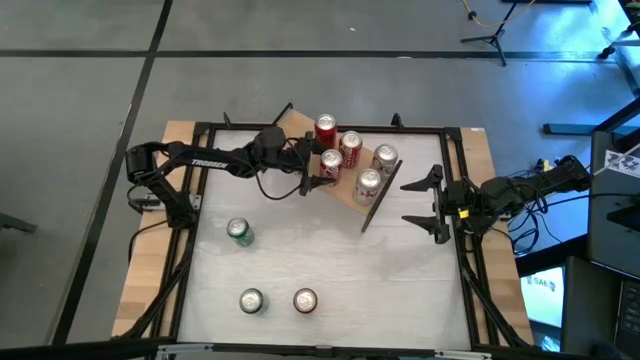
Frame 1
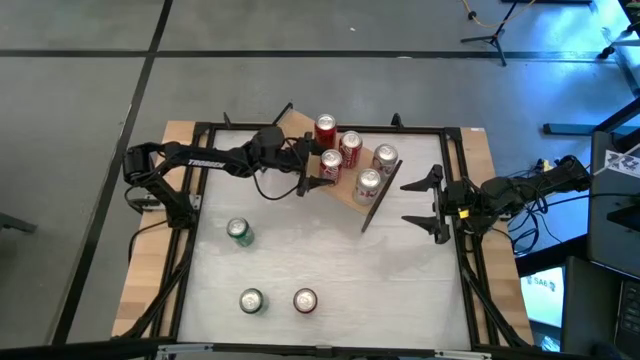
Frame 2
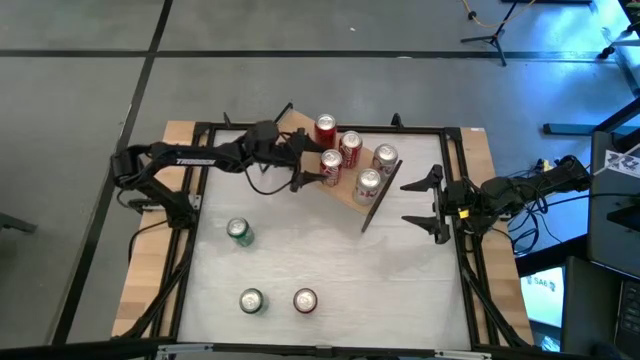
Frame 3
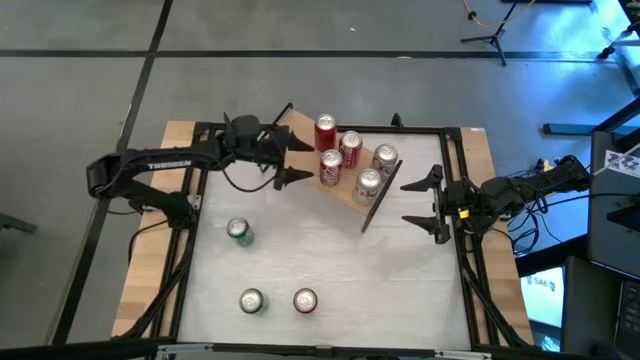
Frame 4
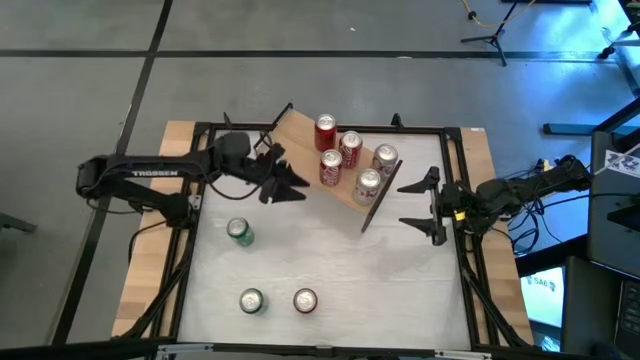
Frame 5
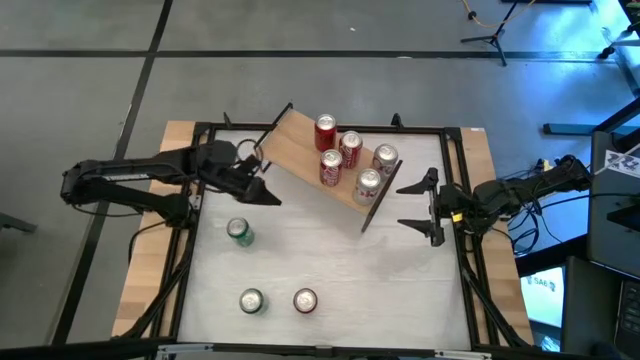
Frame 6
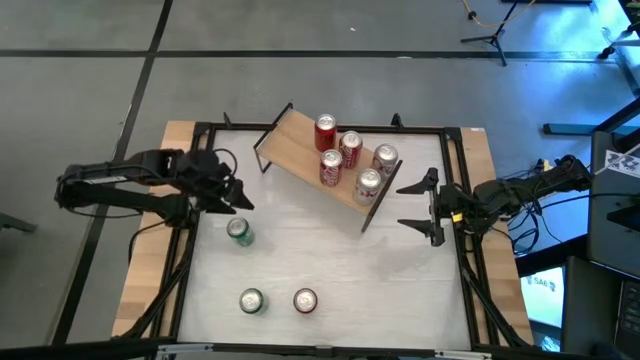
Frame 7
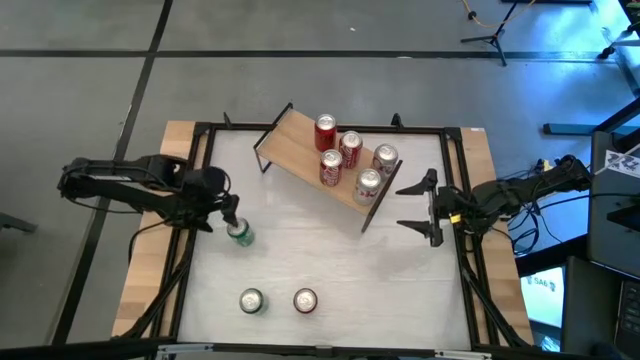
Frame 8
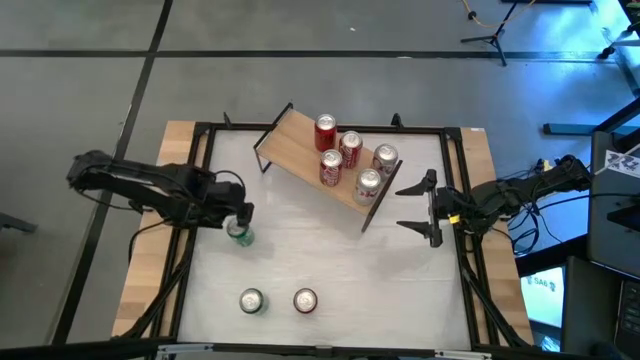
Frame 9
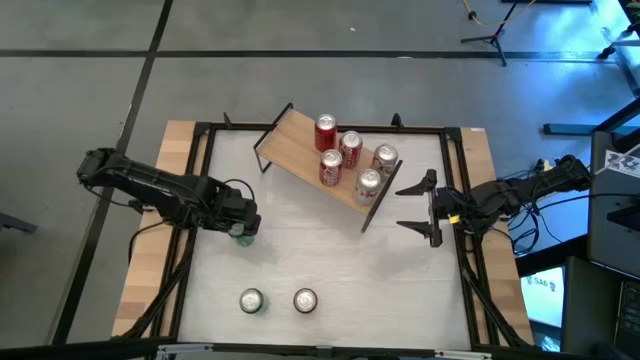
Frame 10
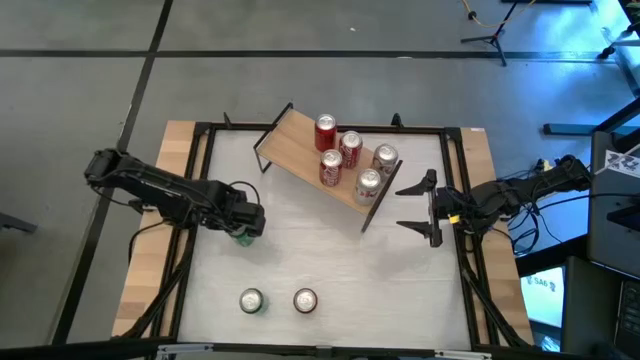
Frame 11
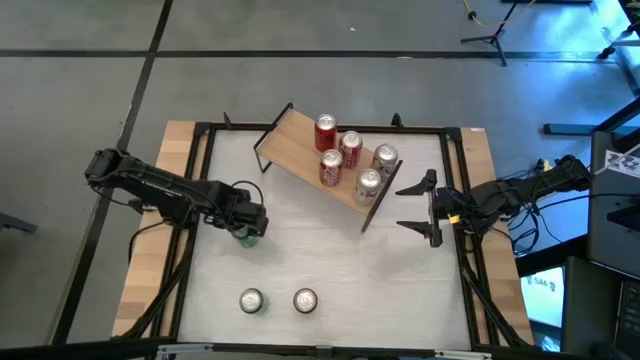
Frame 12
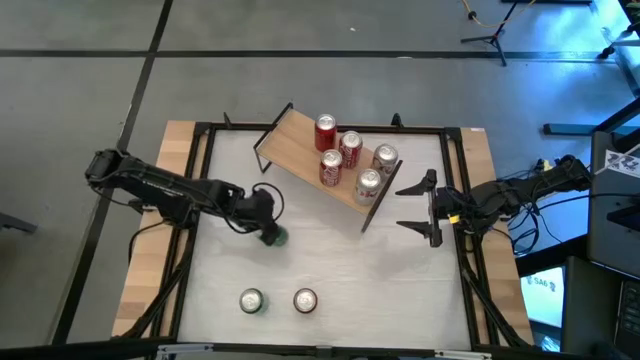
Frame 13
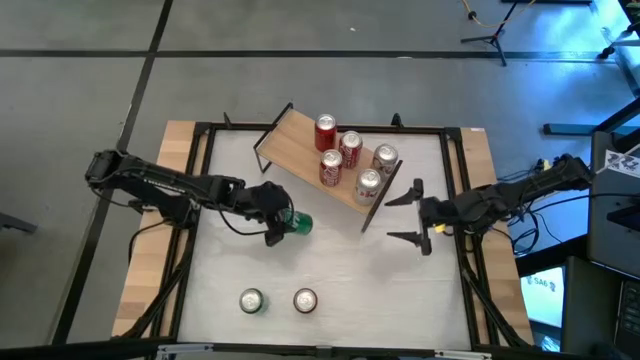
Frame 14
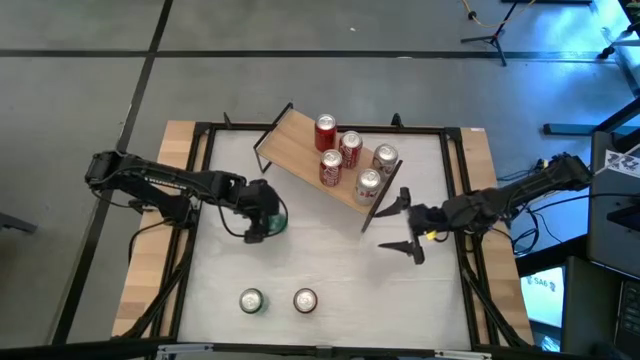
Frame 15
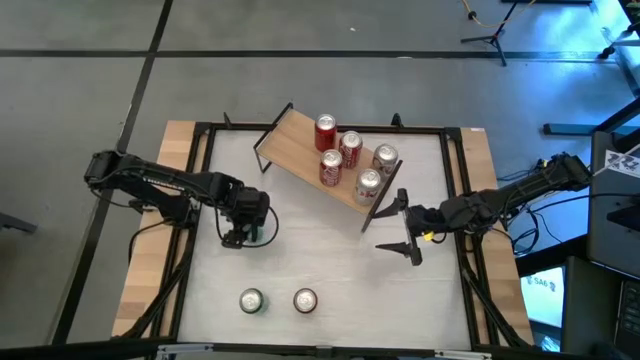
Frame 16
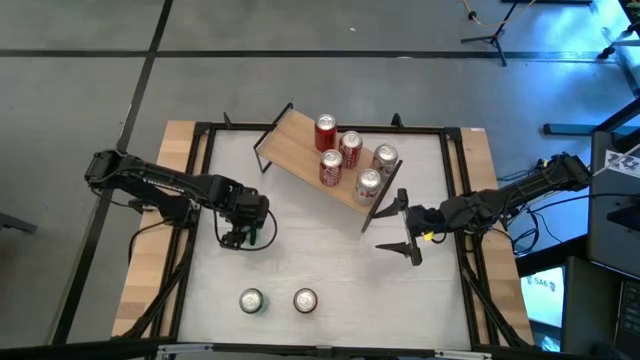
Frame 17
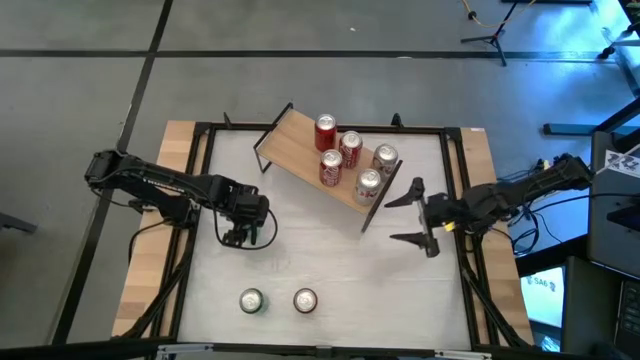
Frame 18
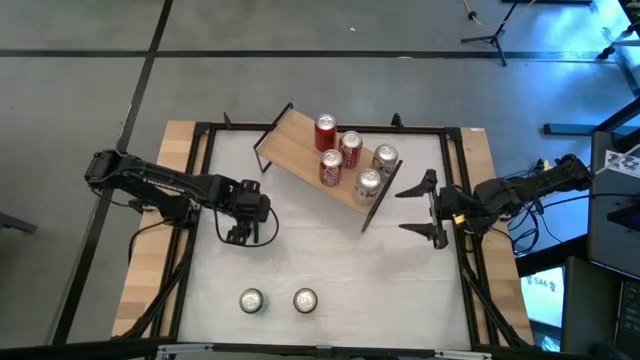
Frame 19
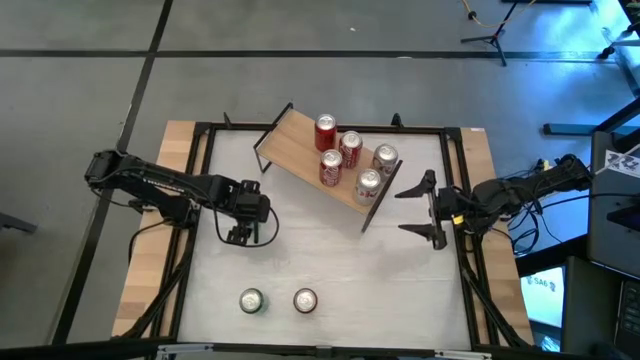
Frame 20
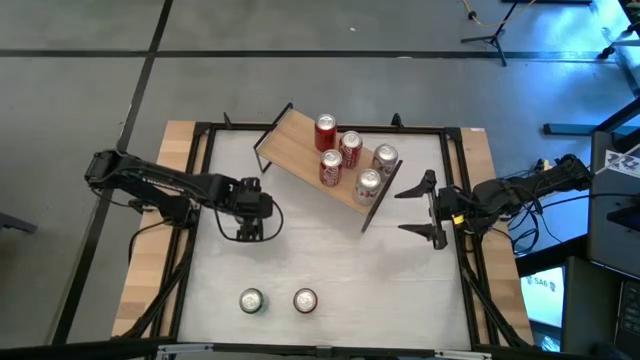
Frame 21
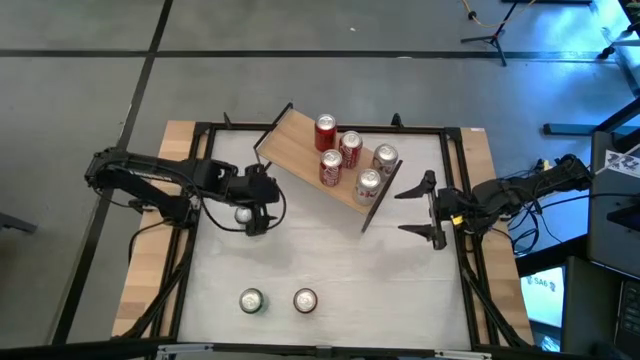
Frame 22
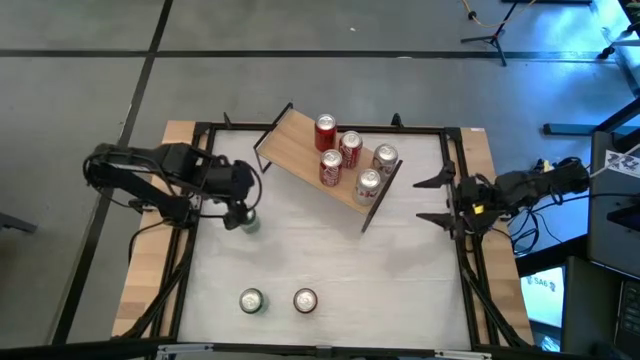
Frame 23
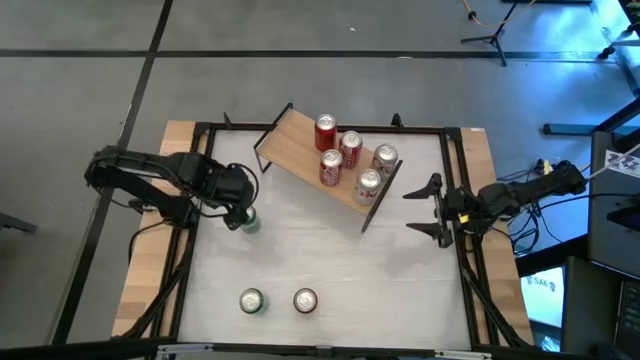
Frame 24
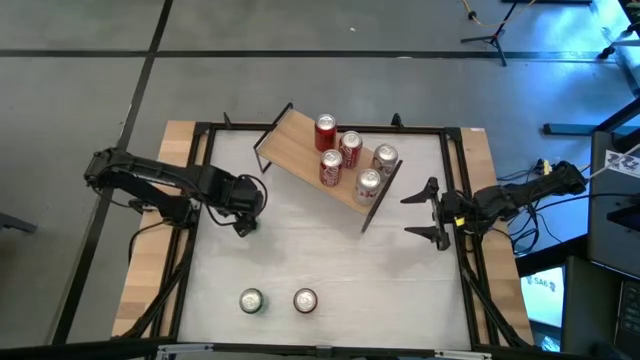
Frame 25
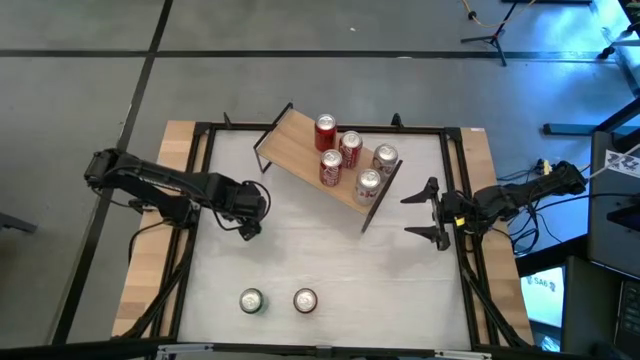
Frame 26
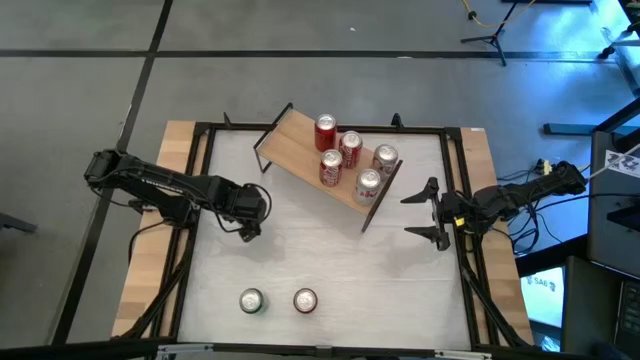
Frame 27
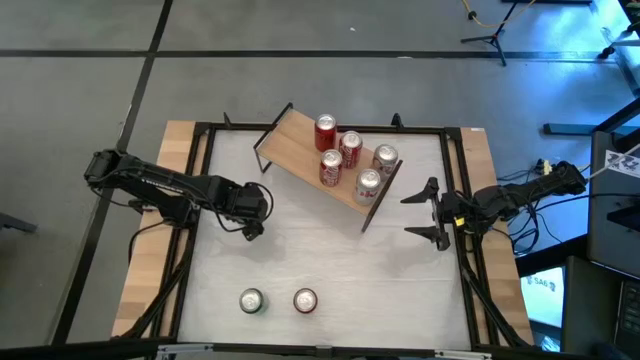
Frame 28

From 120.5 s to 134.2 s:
Task: Place canned beverage on shelf
Put the top green soda can on the shelf

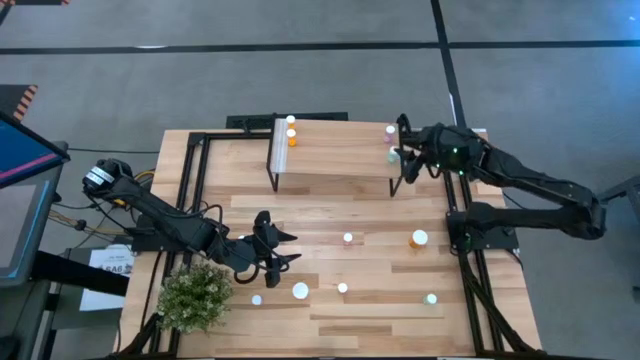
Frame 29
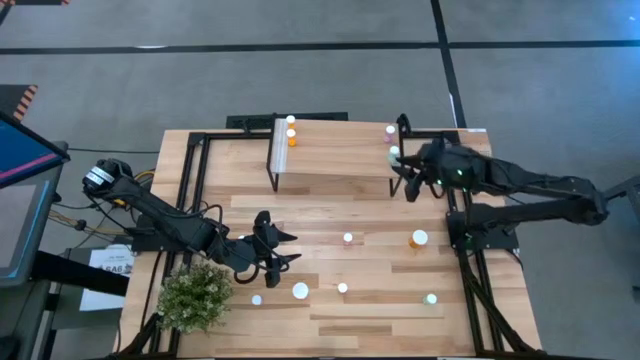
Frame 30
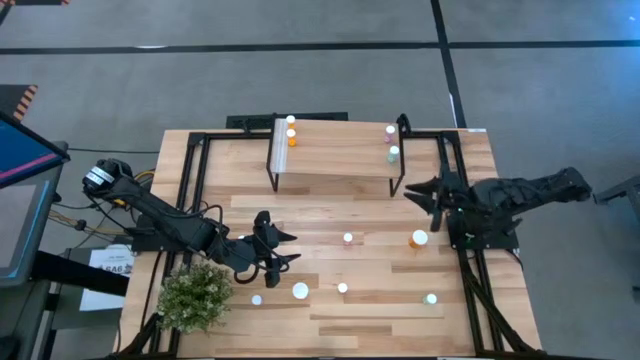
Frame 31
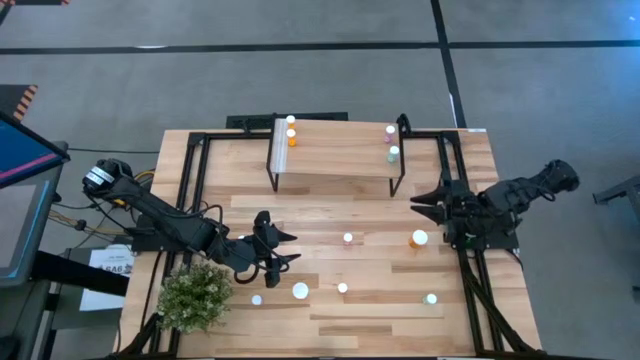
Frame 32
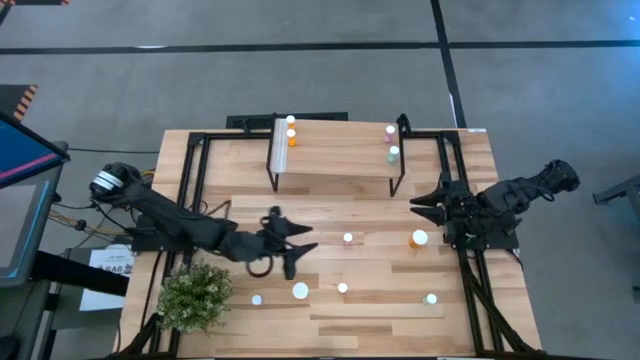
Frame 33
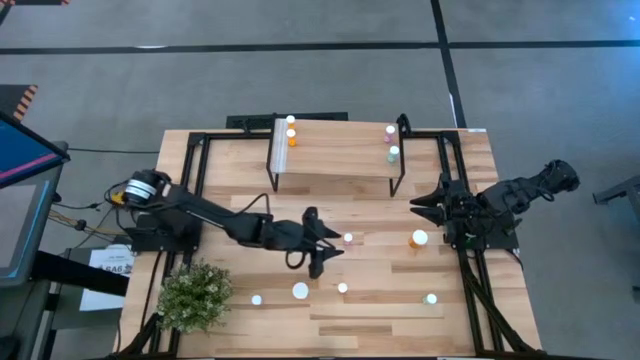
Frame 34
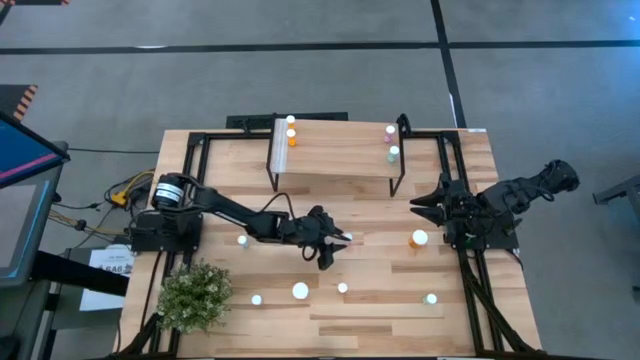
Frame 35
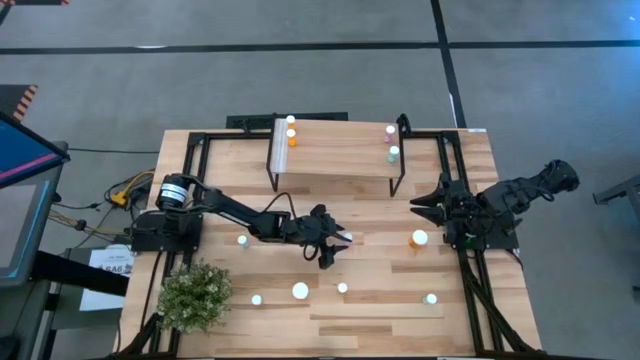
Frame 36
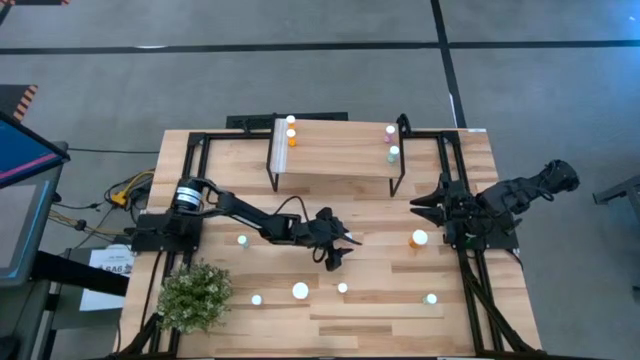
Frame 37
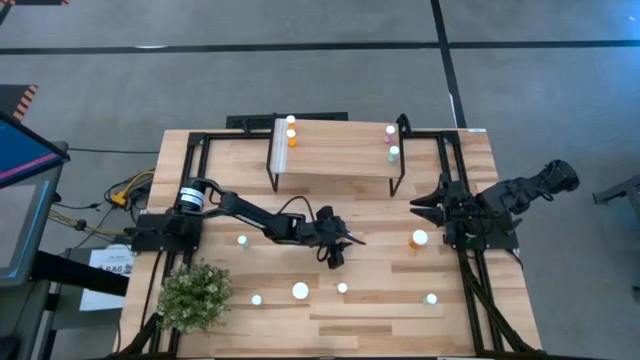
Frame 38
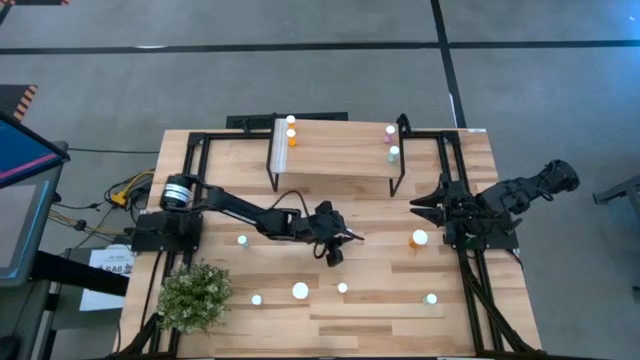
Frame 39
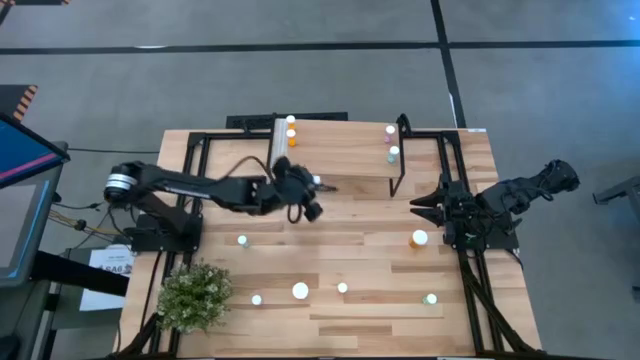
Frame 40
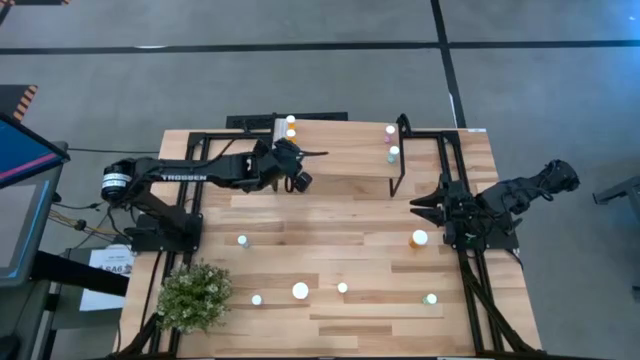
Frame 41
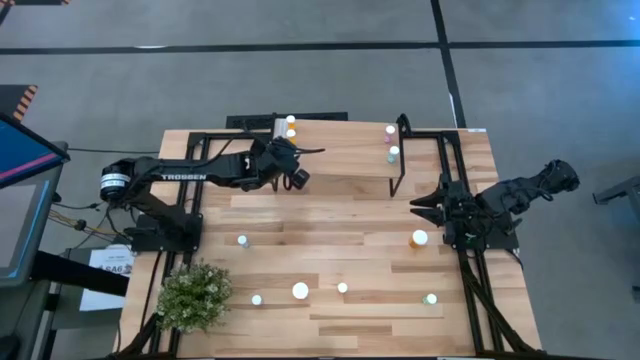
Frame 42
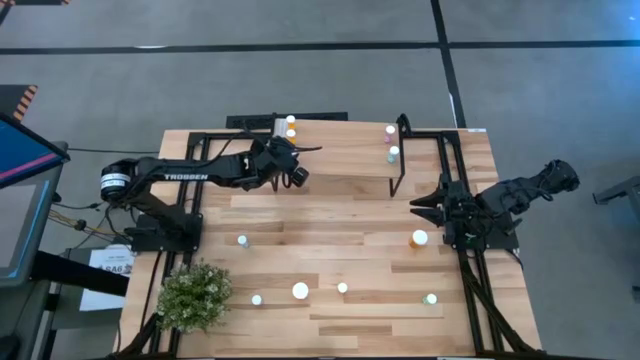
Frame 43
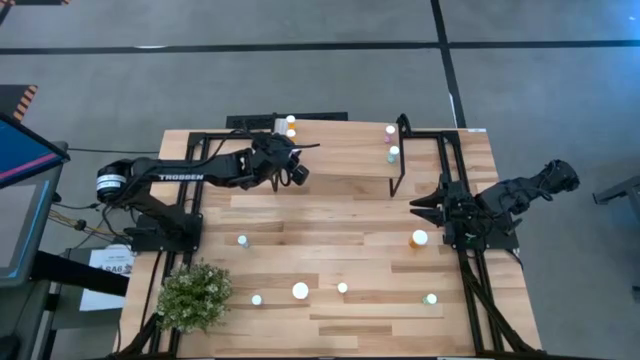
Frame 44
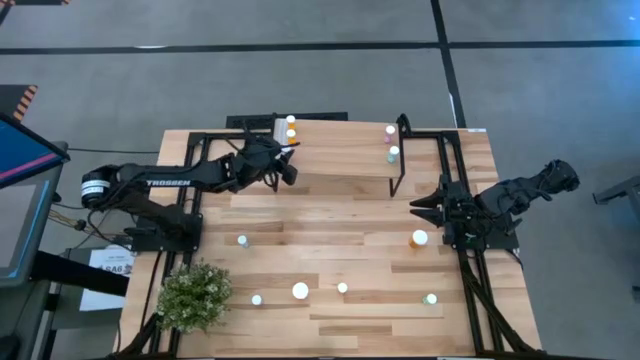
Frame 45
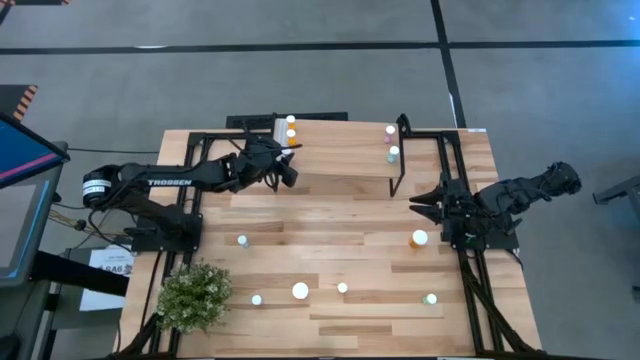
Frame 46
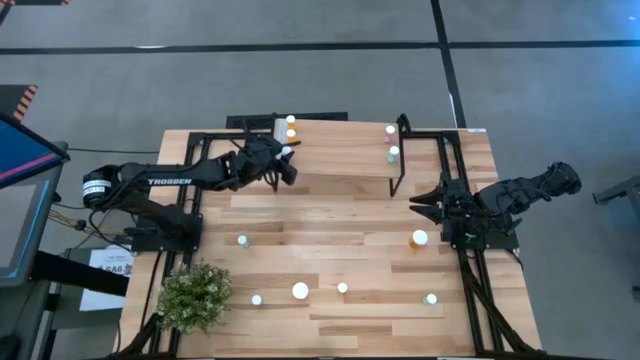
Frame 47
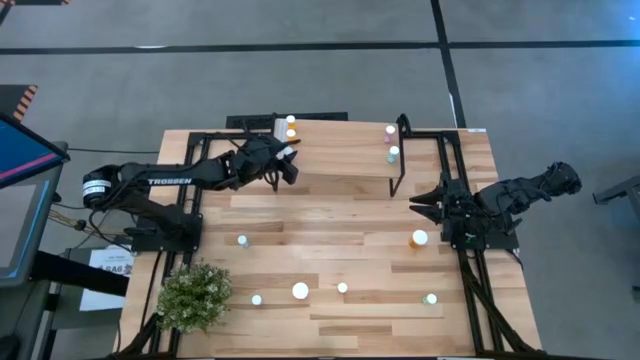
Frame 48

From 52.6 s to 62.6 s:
Task: Pick and place medicine bottles onto shelf by color
Put the top small pink pill bottle on the shelf
